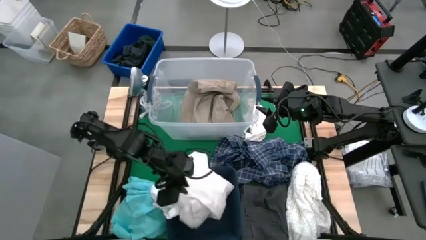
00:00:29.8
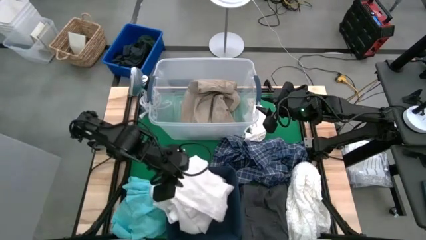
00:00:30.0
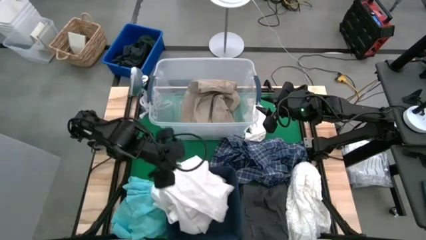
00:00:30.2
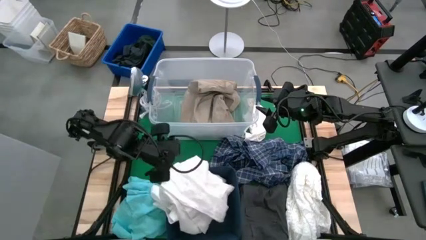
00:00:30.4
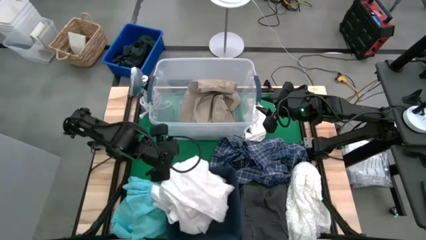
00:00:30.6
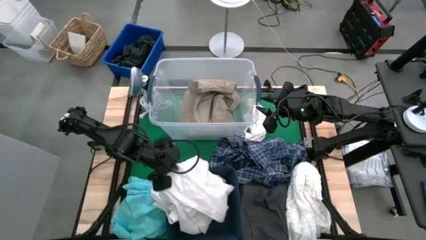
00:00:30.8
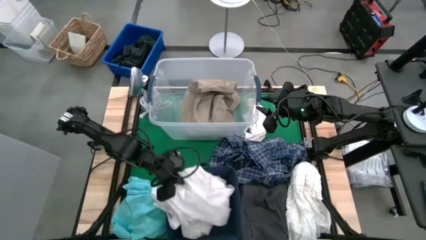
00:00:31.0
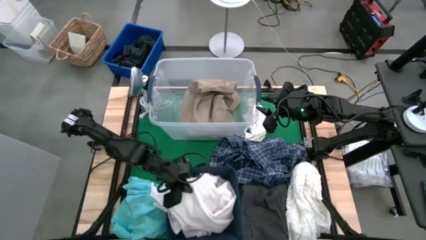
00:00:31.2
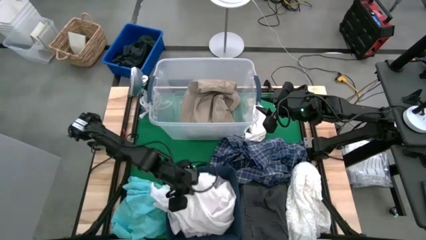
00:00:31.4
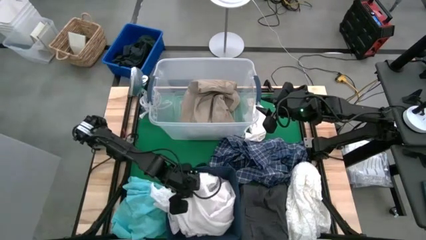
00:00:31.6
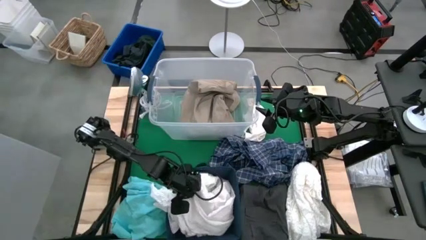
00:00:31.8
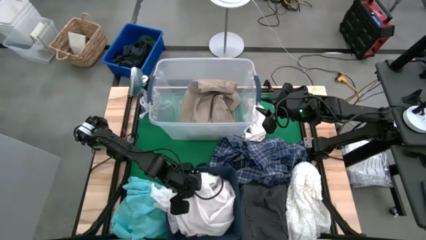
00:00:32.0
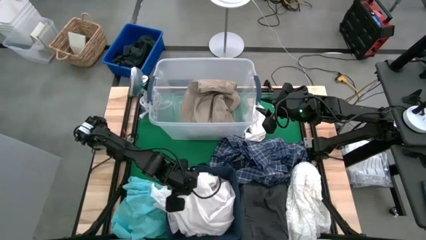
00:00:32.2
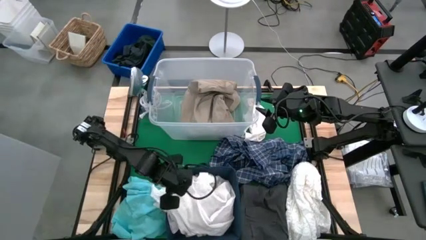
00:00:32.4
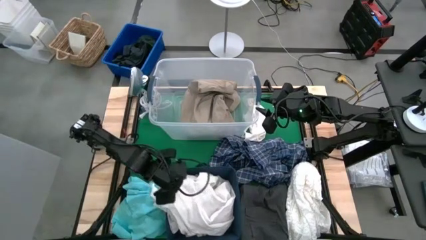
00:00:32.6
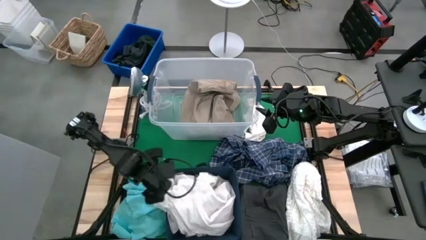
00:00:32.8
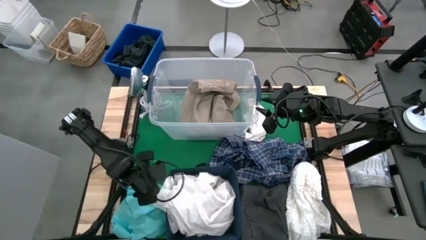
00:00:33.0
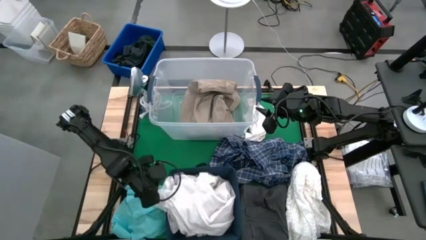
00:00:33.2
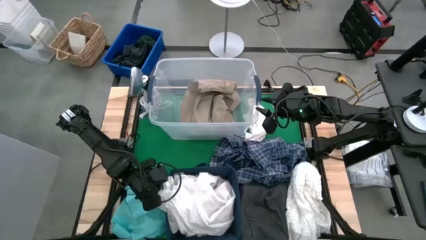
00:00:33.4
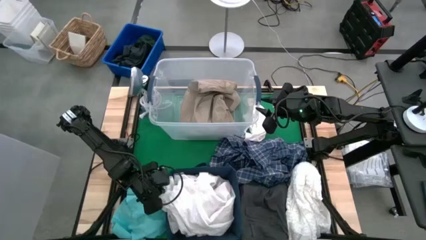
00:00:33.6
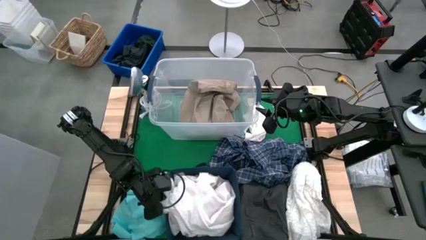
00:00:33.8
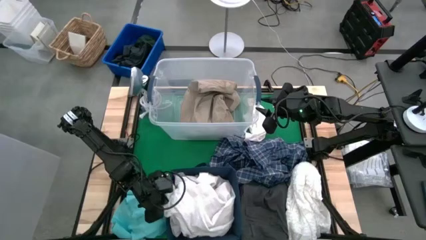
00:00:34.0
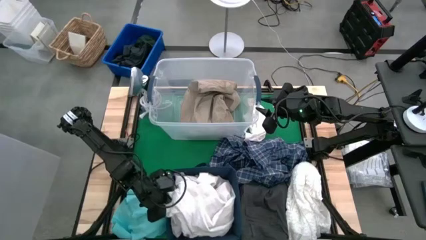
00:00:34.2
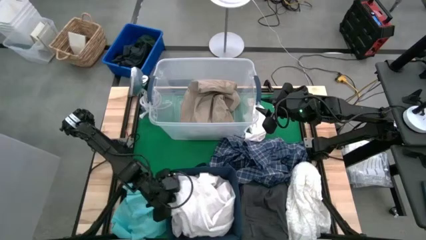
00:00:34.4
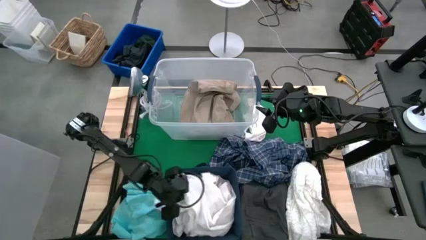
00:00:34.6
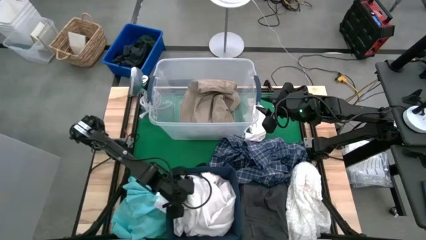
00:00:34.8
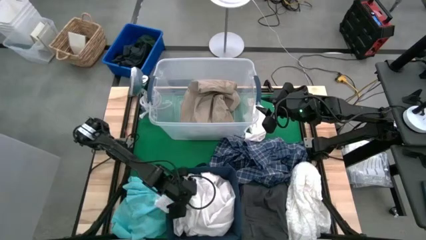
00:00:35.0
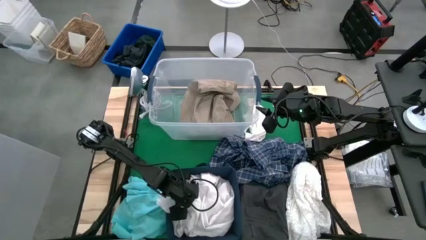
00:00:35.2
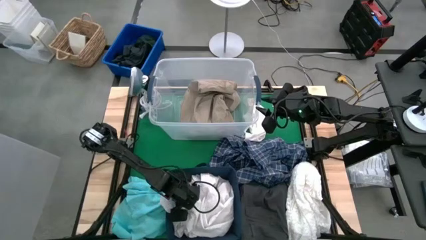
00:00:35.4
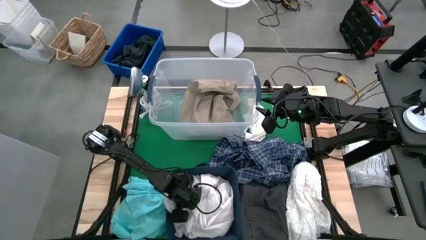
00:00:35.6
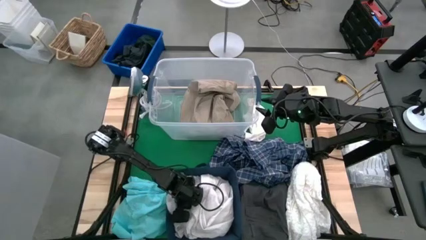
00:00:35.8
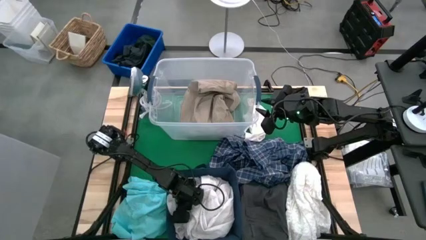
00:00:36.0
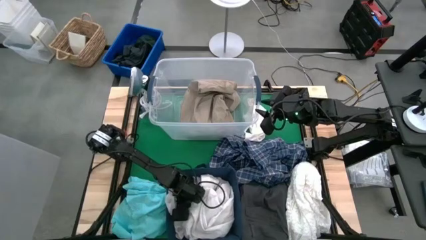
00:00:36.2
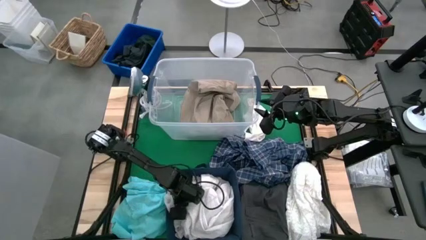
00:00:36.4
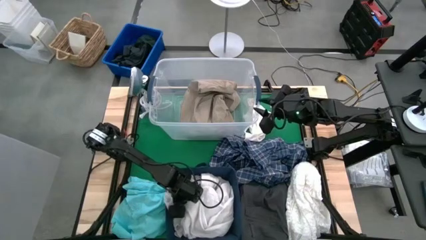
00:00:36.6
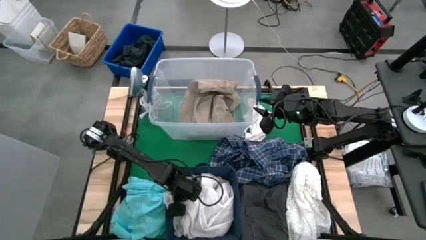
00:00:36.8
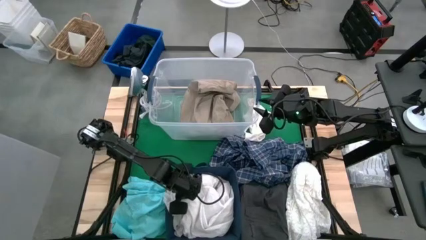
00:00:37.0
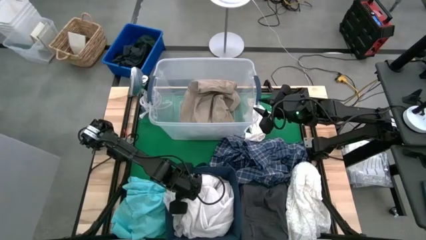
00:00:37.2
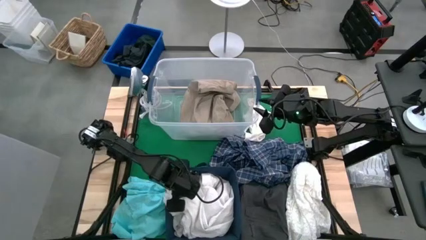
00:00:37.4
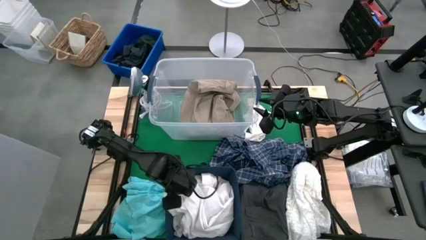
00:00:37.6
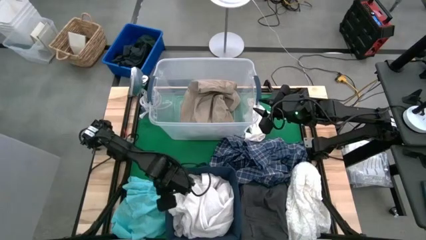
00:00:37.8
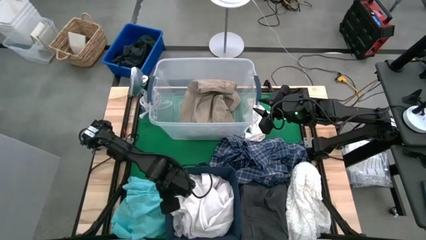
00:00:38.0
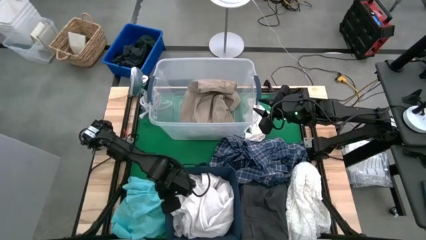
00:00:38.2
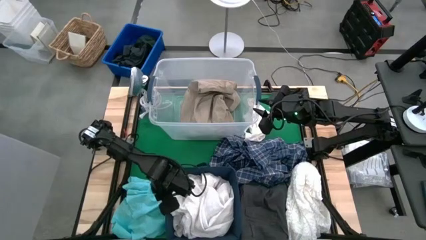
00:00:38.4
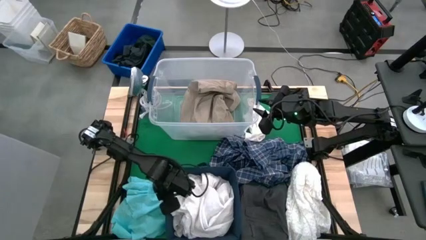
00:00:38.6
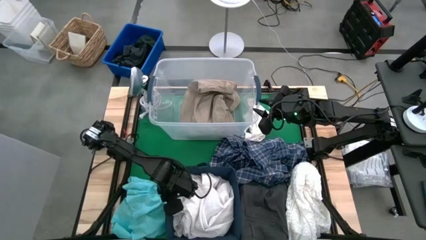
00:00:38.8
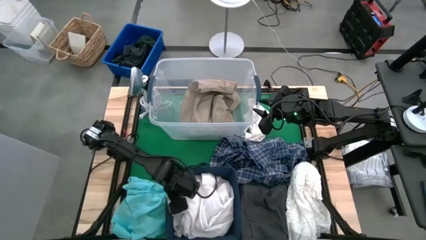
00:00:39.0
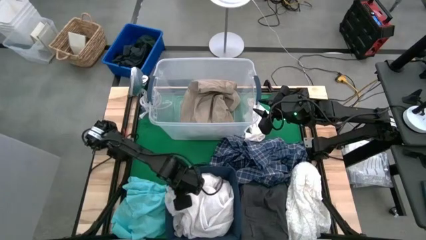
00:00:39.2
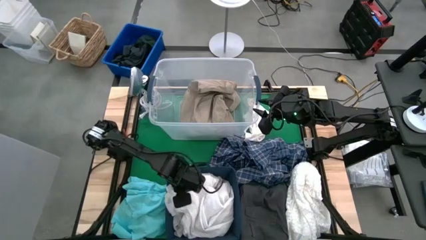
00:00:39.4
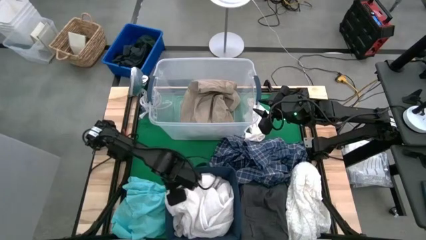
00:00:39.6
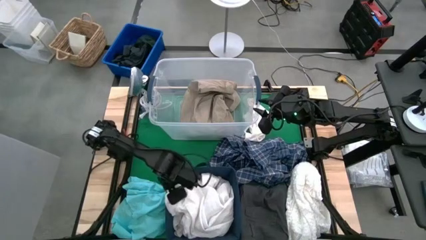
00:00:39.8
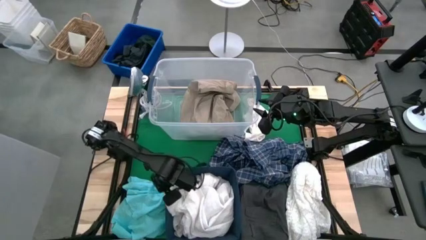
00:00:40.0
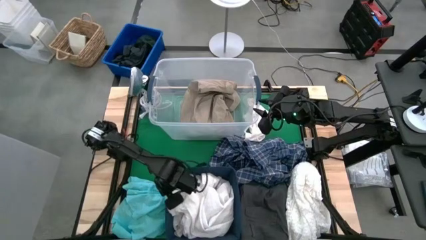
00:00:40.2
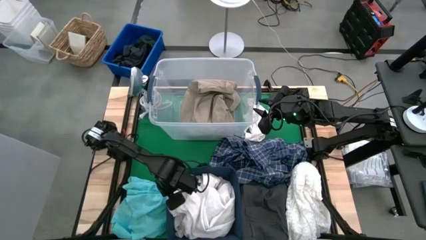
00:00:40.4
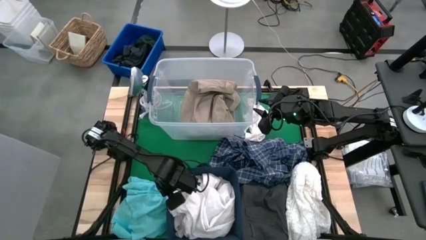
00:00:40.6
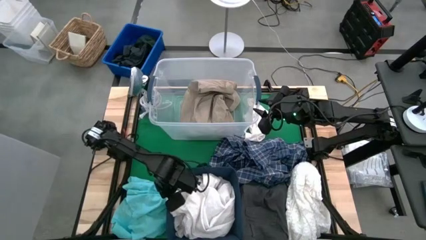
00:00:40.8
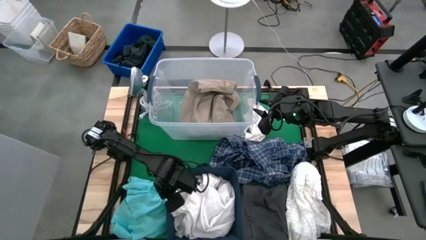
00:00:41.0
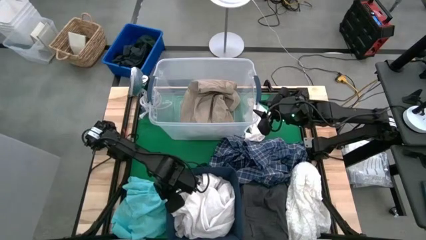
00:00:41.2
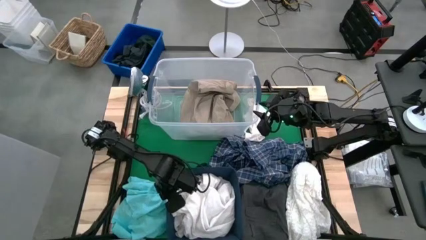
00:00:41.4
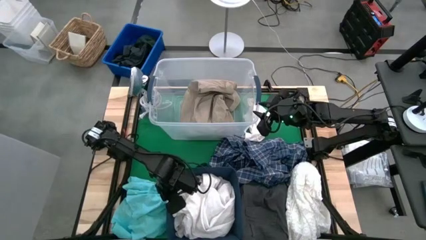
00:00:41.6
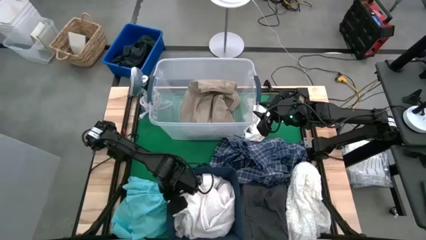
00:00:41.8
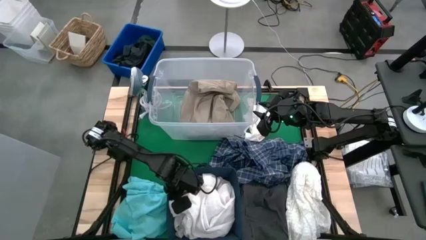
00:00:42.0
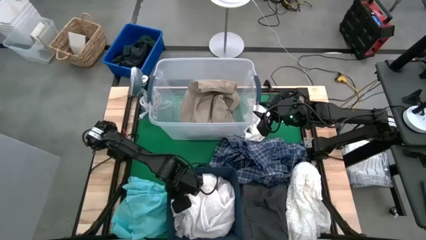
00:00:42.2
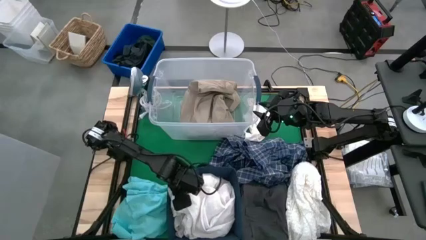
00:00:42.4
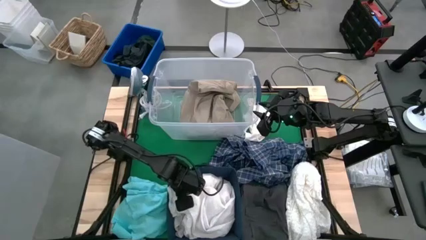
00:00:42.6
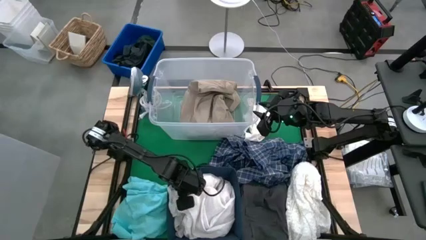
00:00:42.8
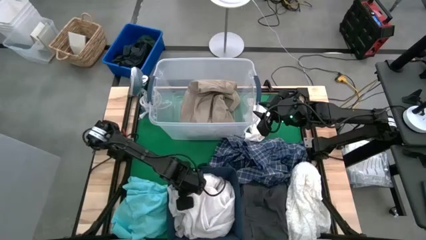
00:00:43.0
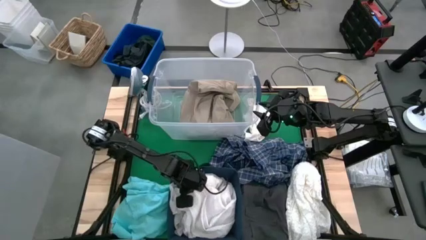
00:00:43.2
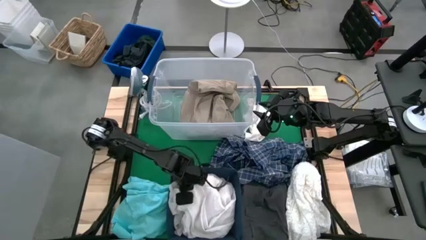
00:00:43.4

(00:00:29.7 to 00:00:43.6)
Task: Sort clothes
Put the white polo shirt into the blue laundry bin

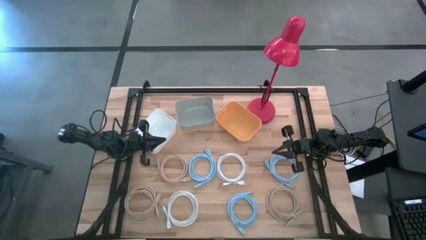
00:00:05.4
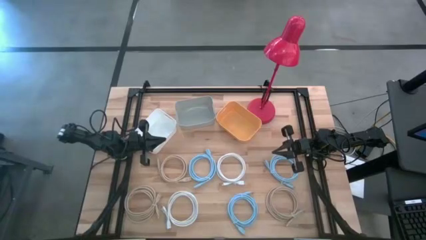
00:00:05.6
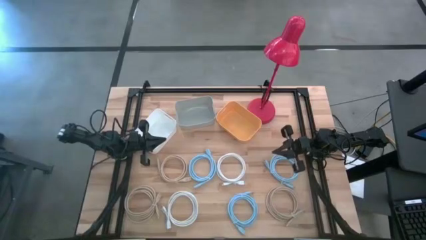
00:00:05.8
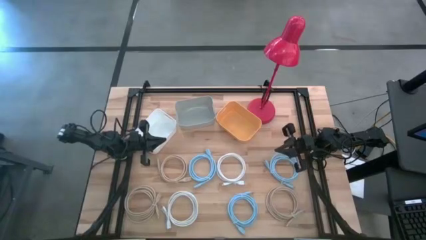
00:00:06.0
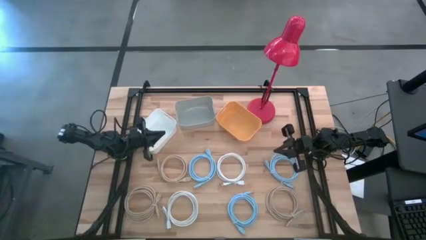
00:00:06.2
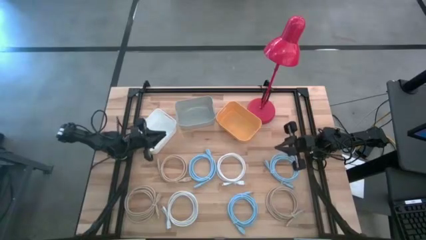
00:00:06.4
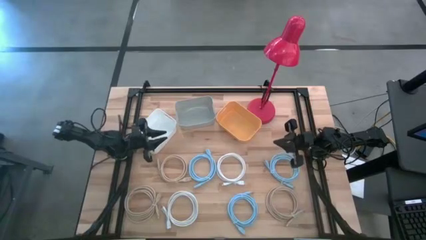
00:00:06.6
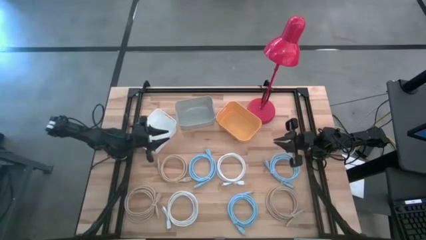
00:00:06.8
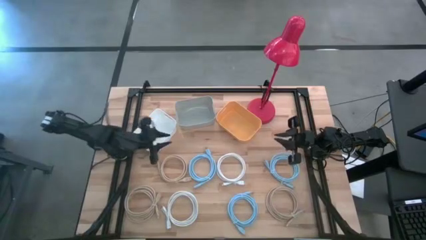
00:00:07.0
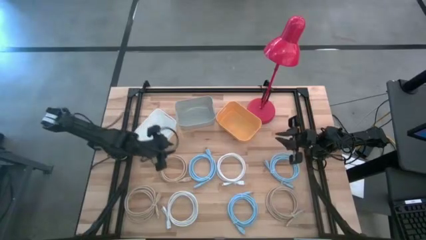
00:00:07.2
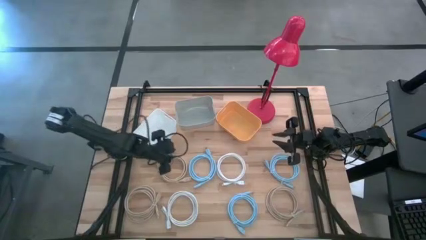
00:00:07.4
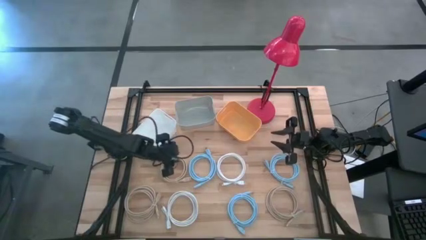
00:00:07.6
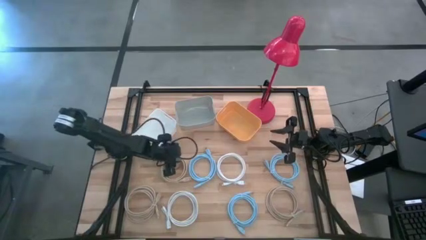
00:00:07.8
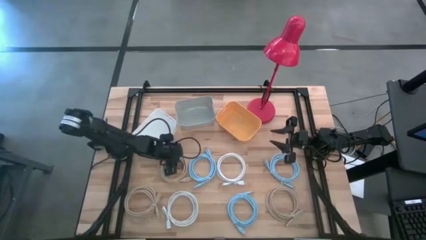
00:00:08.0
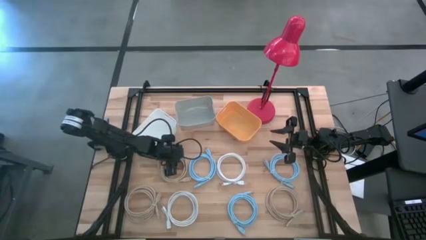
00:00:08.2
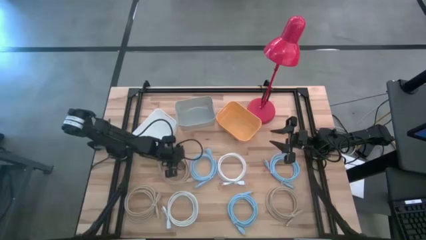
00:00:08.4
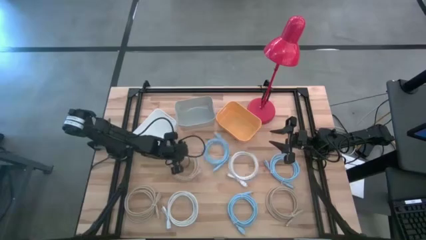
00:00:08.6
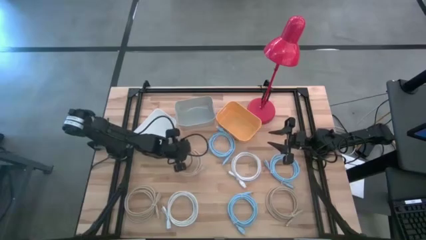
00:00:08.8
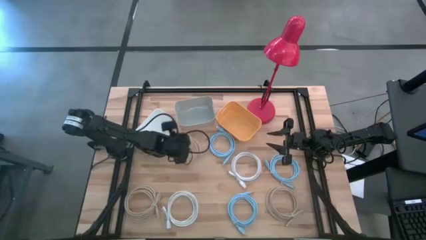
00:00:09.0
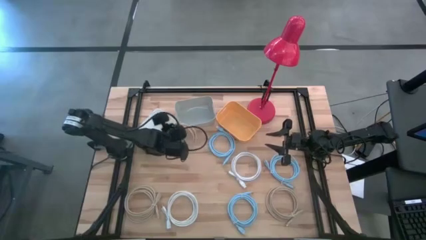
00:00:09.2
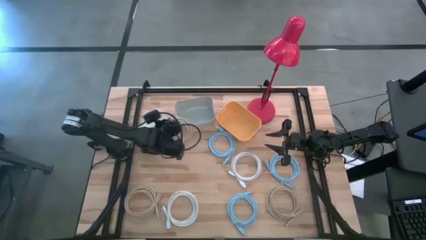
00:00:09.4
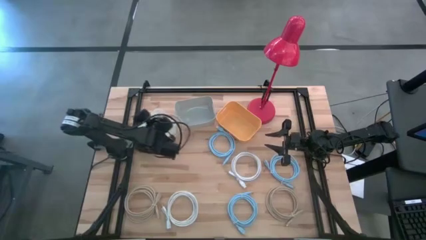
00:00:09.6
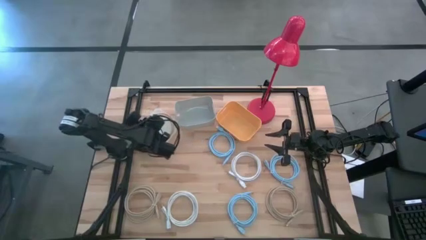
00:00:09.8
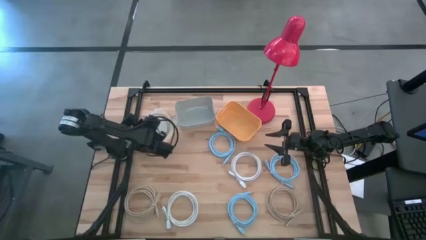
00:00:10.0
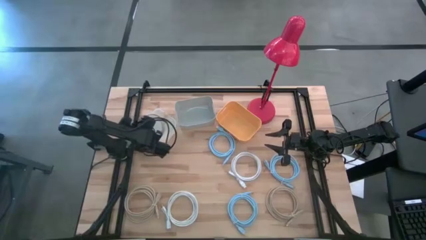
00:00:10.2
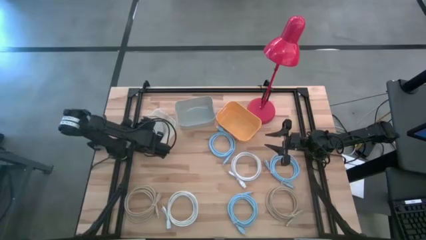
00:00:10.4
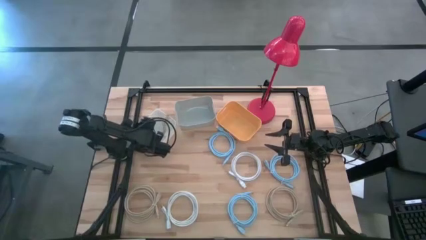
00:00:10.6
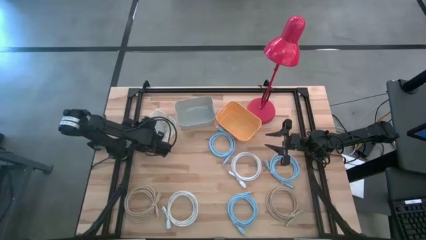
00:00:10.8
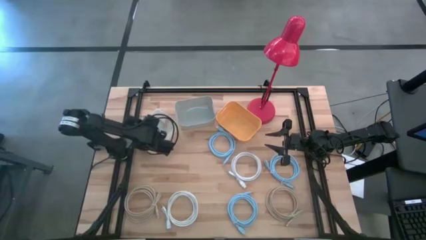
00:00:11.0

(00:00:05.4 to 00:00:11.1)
Task: Sort HDMI cables
Put the top left brown hdmi cable into the white bin
